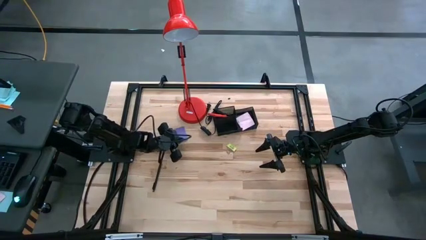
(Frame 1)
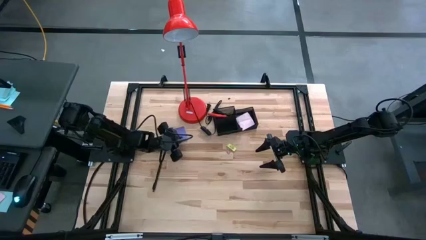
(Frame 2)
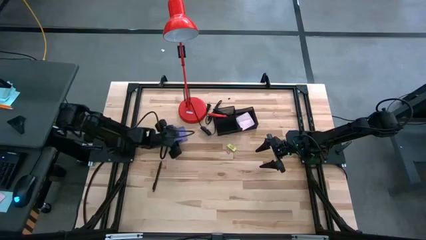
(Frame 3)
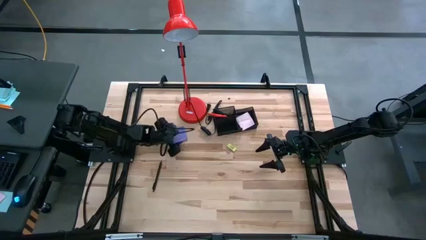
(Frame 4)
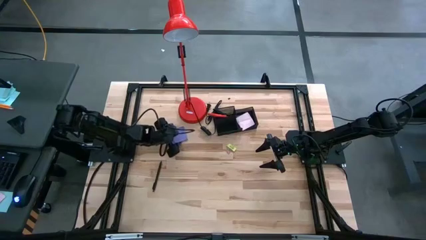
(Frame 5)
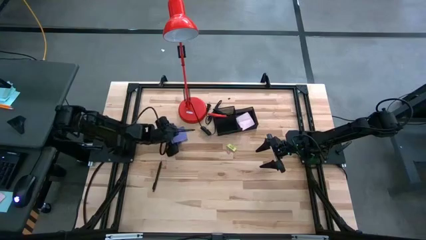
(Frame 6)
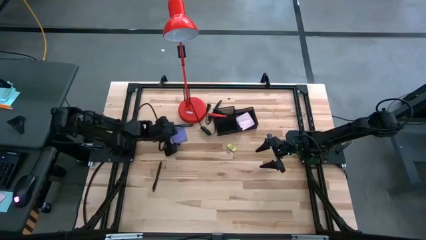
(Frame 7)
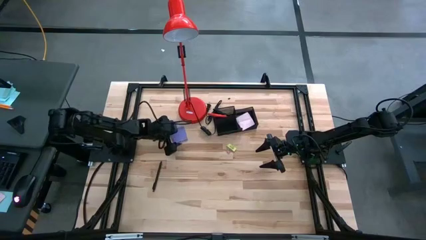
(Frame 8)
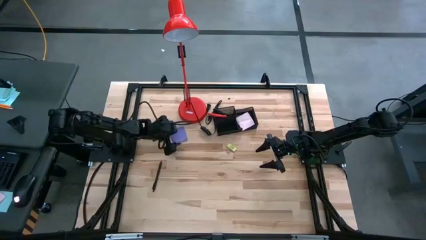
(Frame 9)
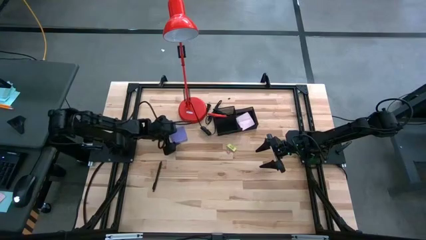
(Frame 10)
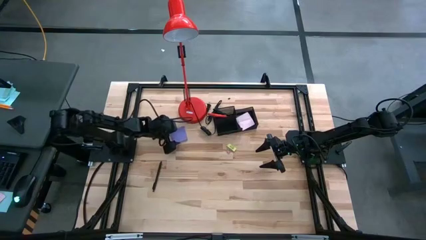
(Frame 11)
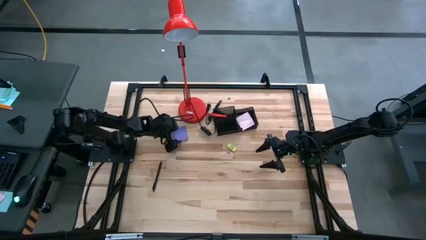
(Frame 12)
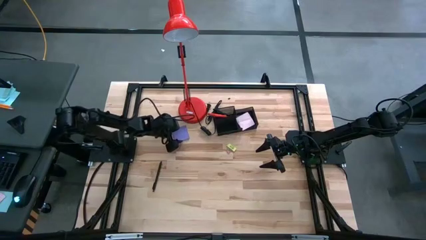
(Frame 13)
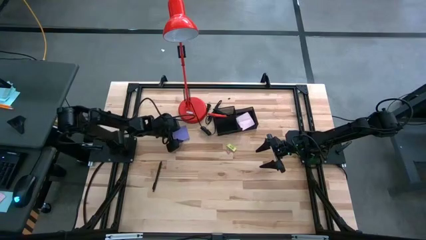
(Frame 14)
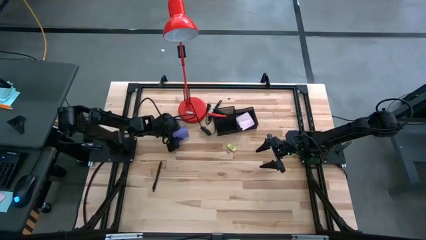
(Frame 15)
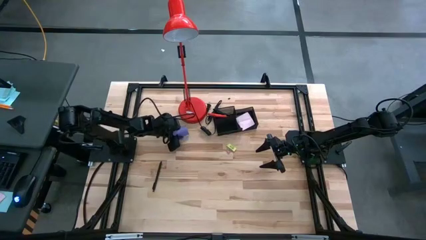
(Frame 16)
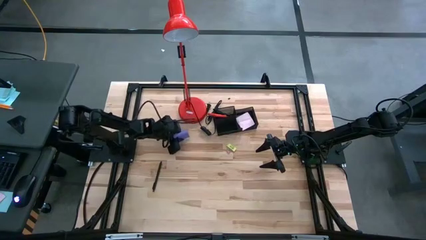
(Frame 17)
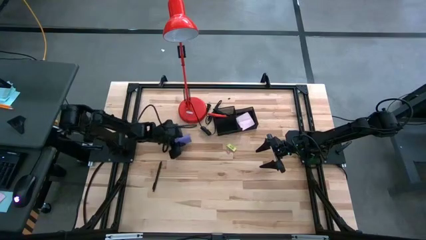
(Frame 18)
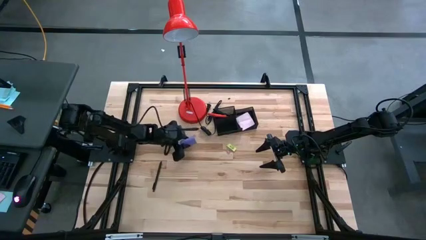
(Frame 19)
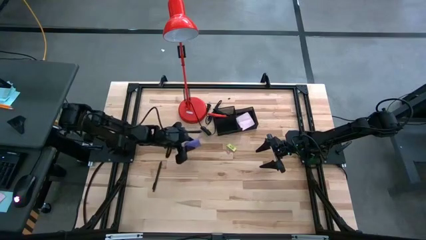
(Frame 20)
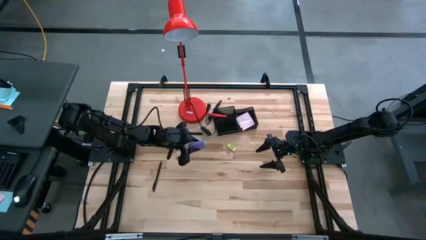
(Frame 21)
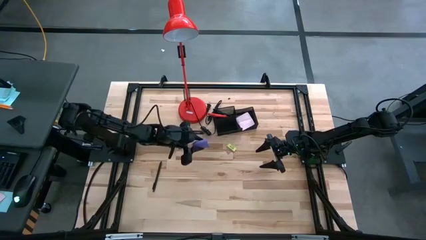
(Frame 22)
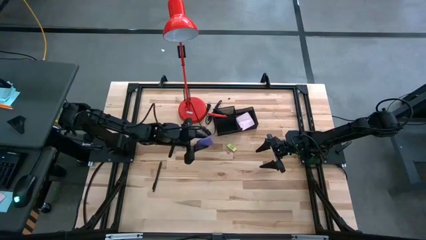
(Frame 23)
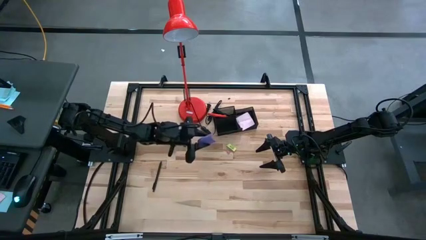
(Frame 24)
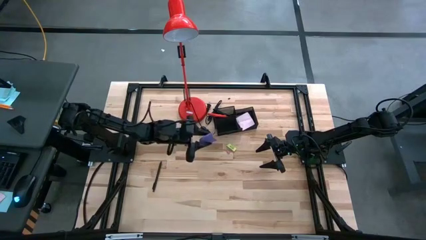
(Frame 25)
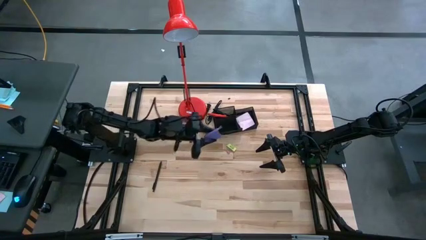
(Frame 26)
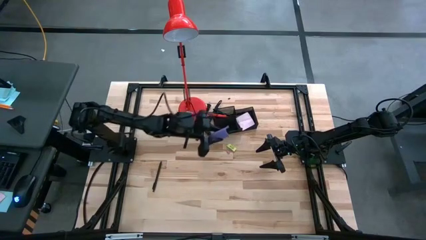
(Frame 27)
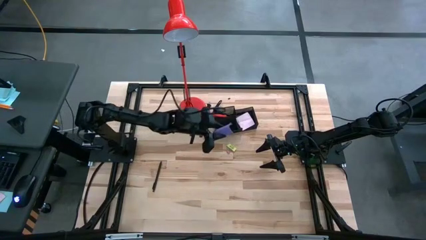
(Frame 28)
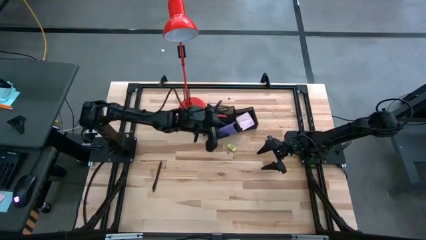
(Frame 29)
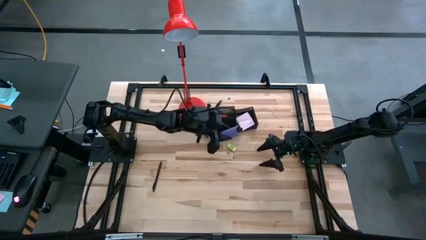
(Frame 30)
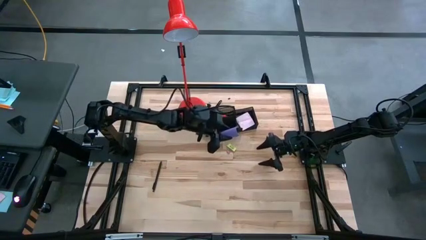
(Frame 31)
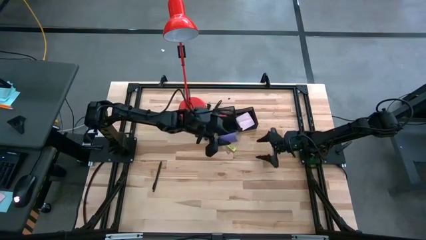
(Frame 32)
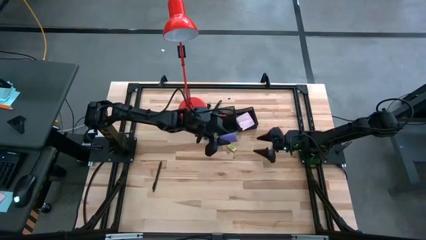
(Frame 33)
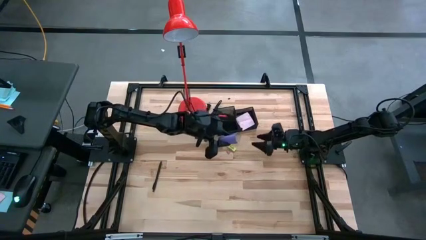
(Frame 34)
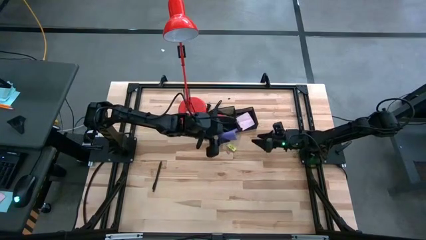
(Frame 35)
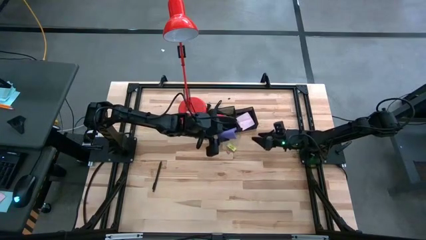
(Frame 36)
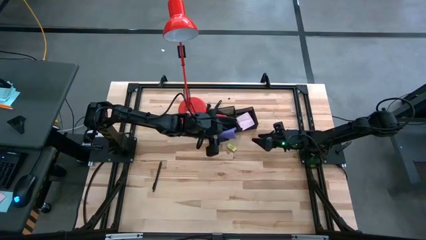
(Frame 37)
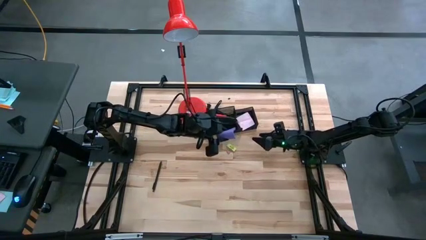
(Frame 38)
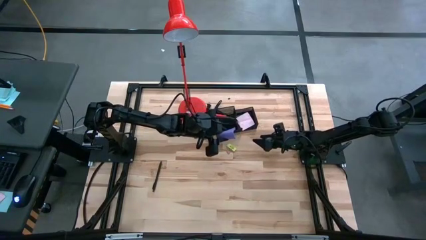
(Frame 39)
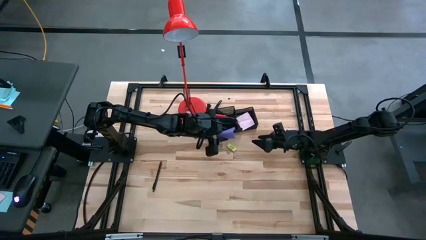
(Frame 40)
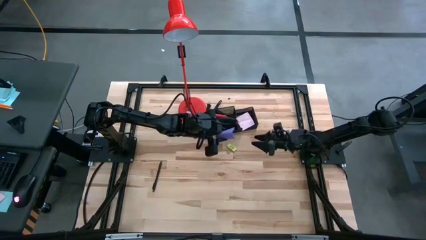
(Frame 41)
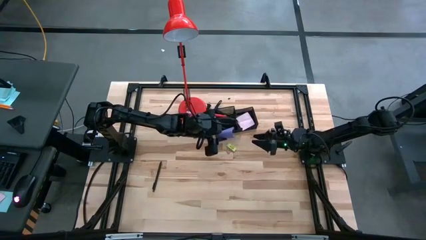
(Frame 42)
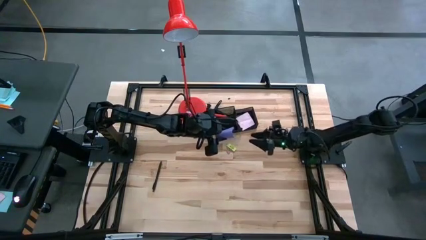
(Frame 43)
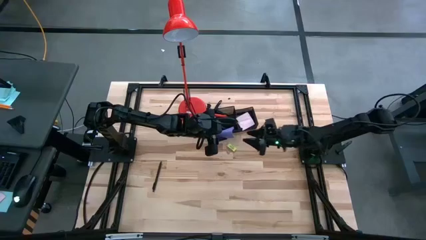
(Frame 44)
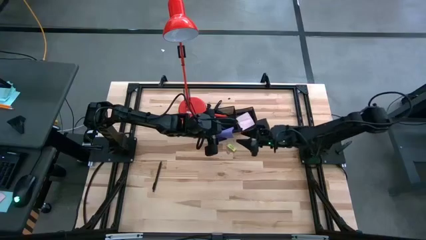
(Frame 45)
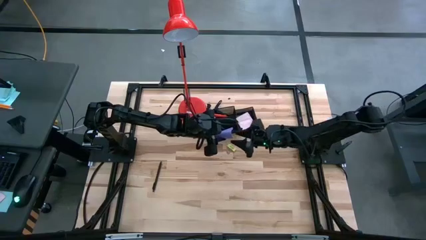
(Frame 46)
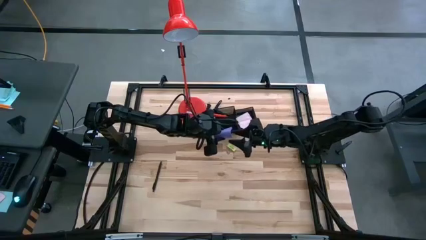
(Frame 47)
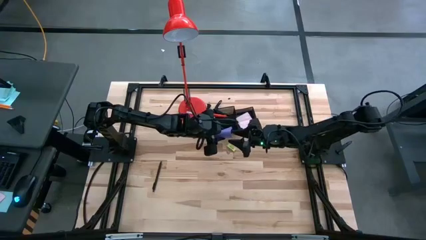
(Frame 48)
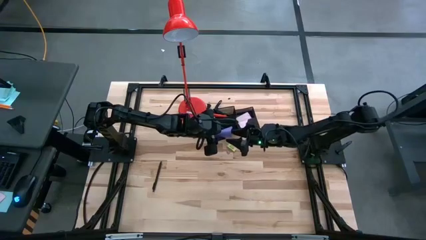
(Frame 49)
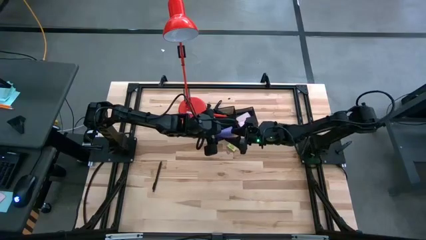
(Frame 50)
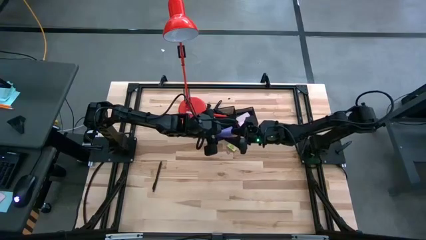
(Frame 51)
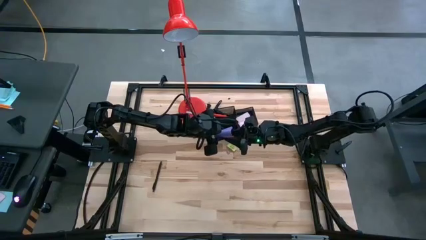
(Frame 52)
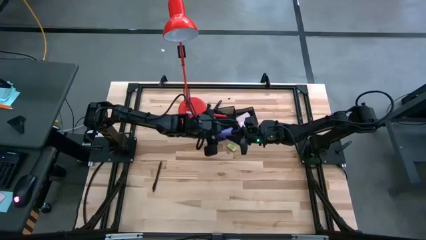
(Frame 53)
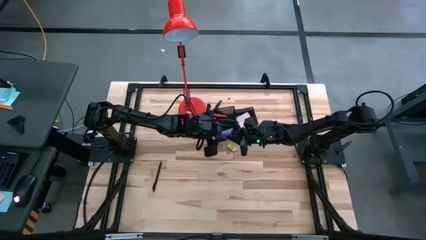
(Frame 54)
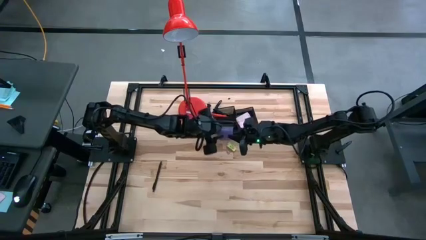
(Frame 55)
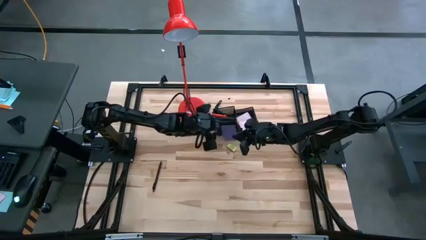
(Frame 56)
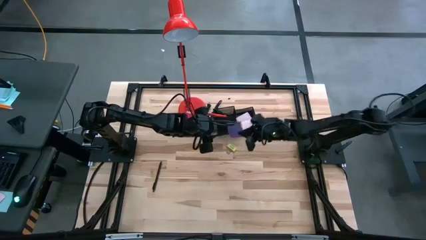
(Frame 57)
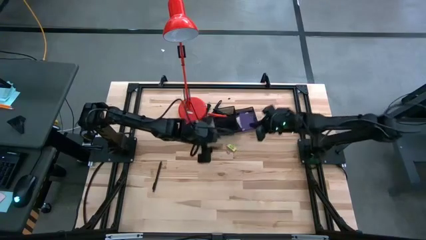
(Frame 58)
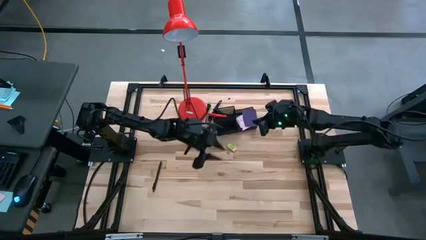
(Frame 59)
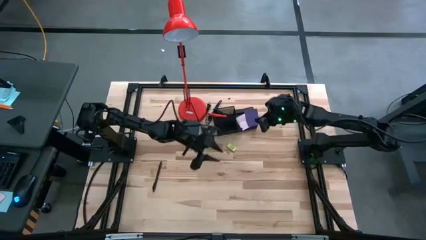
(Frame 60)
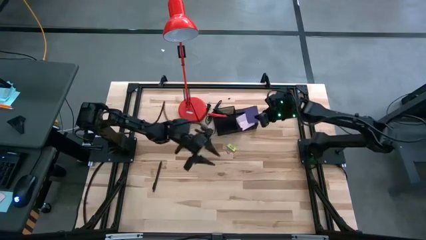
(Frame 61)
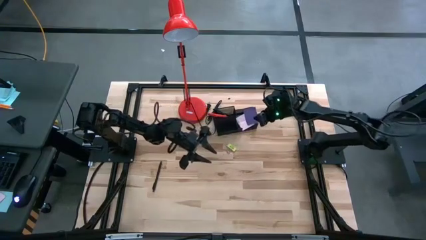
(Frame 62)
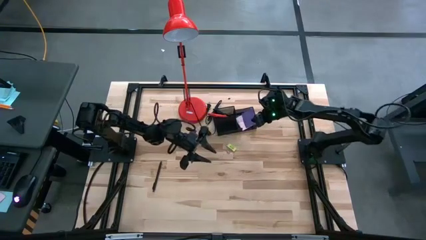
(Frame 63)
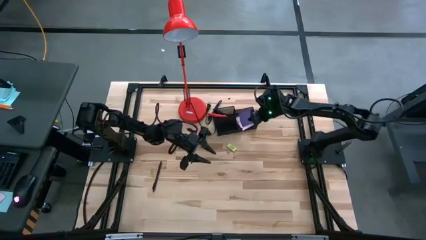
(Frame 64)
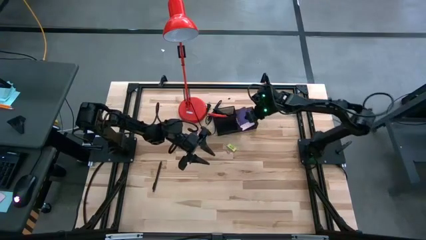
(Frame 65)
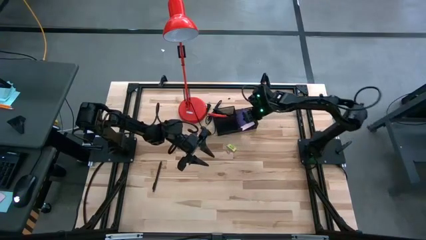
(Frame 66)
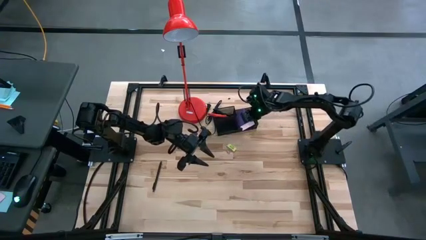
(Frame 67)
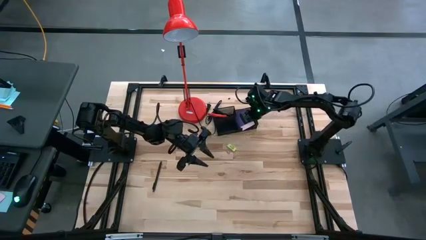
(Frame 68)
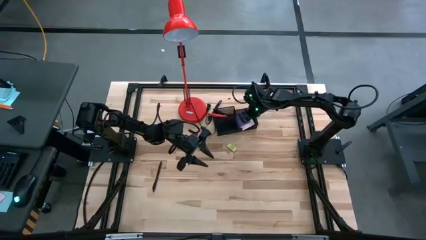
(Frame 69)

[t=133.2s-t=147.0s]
Task: Pick and place office supplies into organizer
Put the blue sticky notes into the black desk organizer
